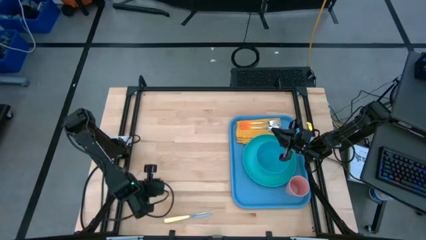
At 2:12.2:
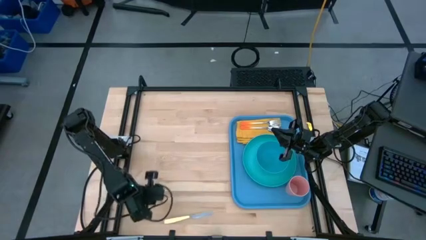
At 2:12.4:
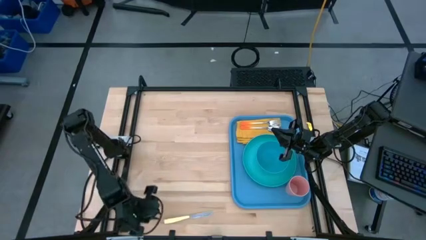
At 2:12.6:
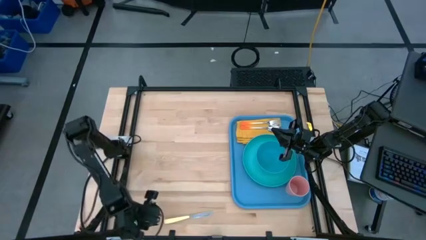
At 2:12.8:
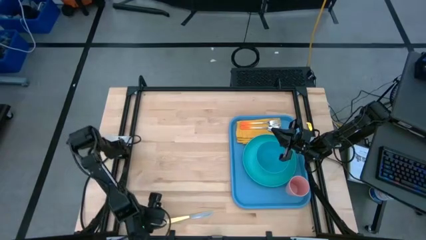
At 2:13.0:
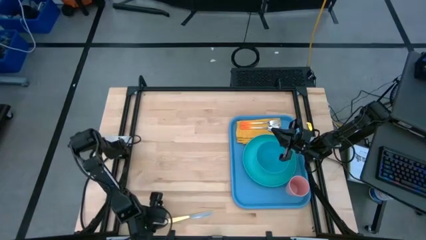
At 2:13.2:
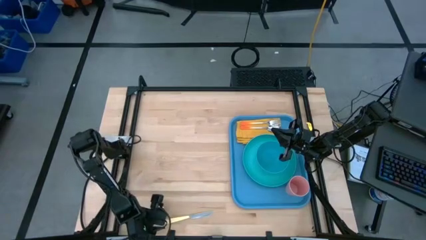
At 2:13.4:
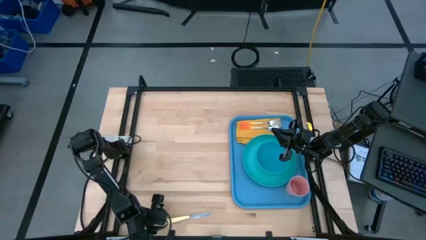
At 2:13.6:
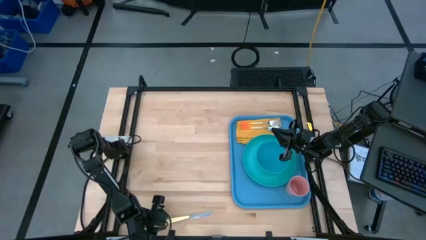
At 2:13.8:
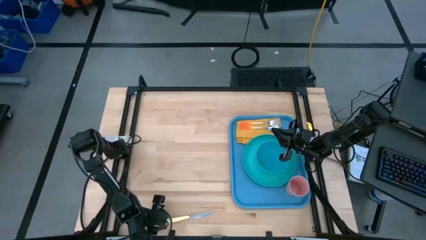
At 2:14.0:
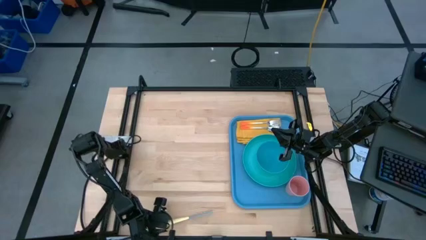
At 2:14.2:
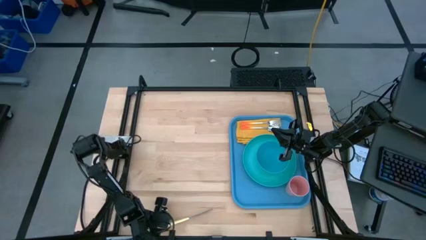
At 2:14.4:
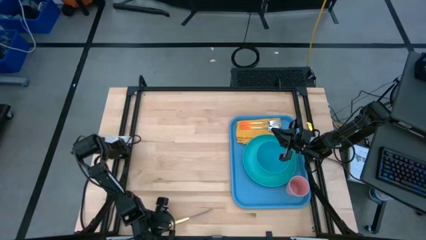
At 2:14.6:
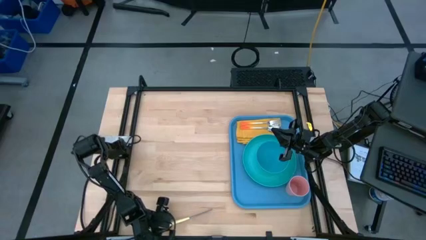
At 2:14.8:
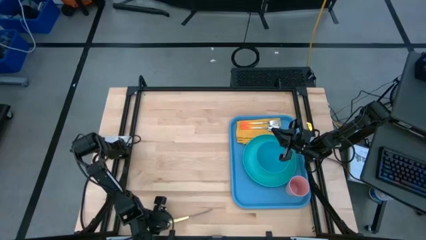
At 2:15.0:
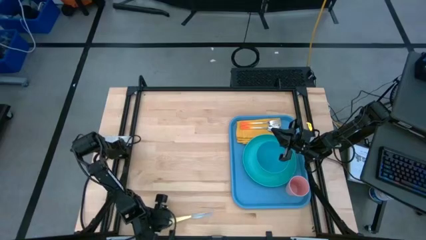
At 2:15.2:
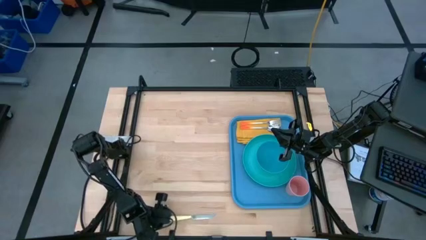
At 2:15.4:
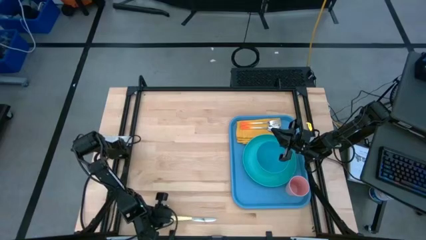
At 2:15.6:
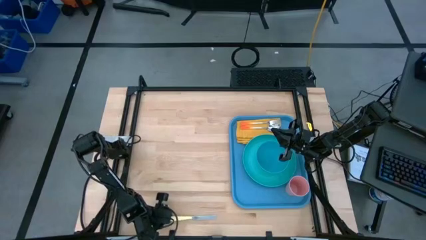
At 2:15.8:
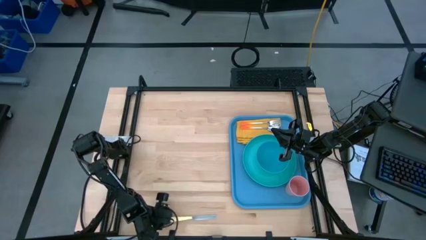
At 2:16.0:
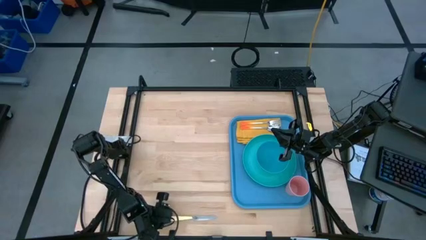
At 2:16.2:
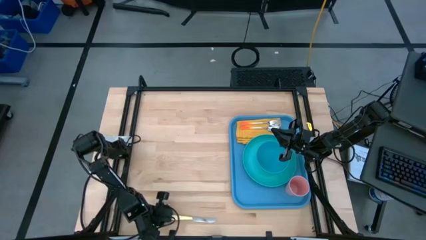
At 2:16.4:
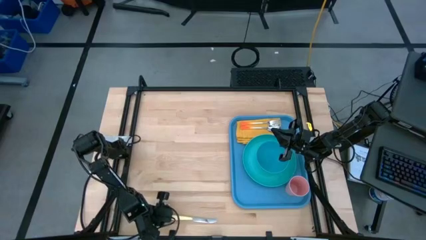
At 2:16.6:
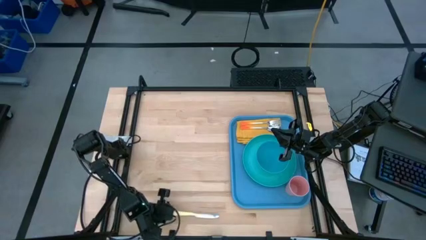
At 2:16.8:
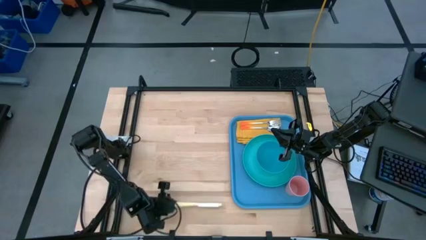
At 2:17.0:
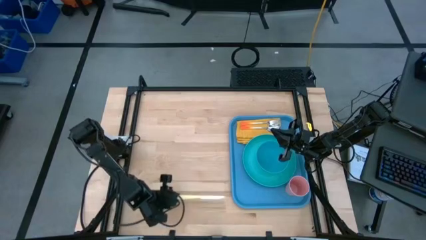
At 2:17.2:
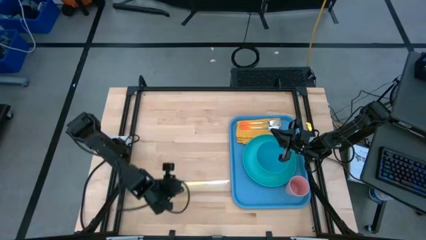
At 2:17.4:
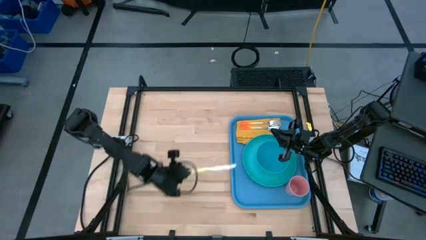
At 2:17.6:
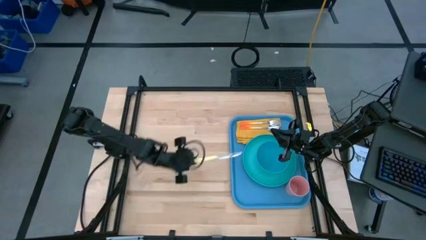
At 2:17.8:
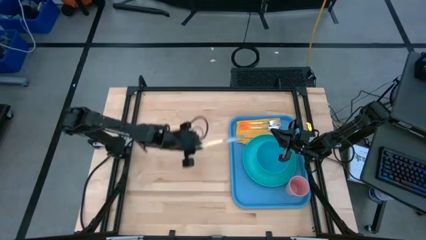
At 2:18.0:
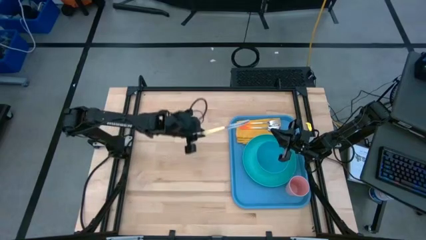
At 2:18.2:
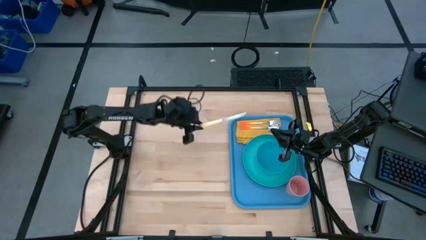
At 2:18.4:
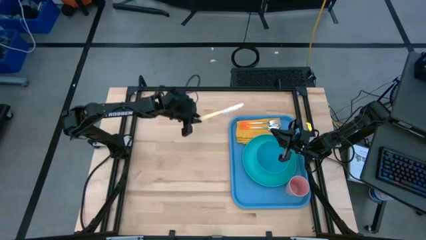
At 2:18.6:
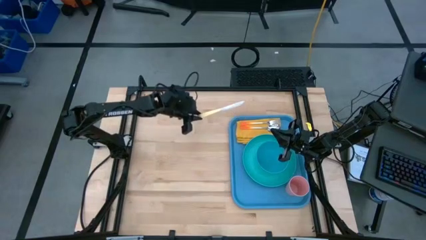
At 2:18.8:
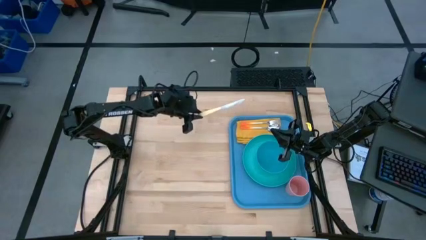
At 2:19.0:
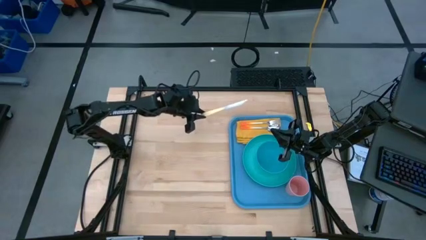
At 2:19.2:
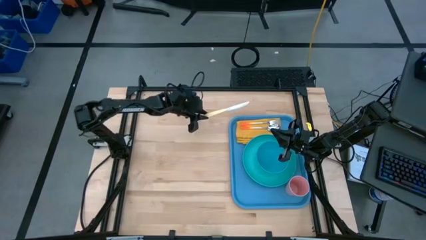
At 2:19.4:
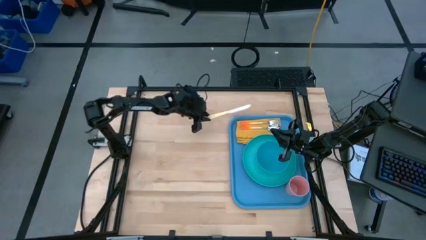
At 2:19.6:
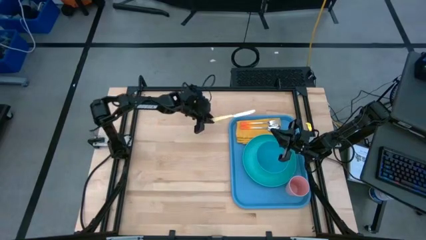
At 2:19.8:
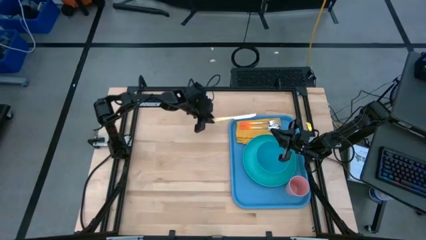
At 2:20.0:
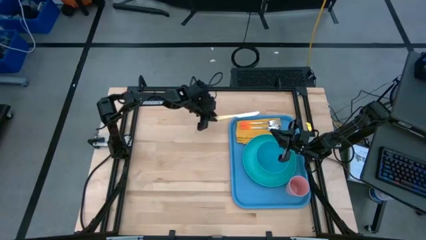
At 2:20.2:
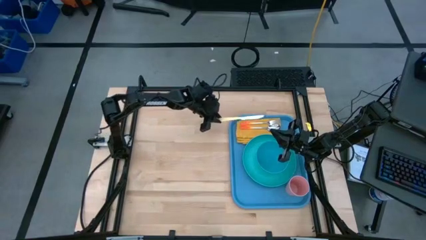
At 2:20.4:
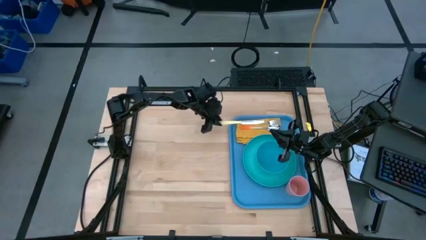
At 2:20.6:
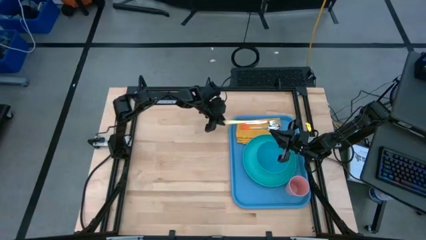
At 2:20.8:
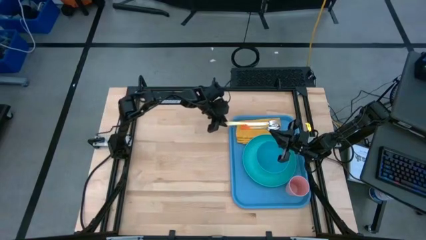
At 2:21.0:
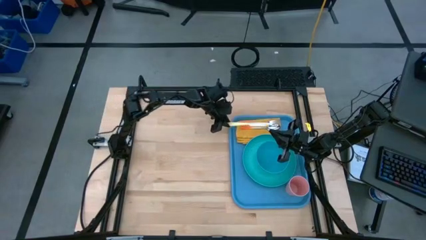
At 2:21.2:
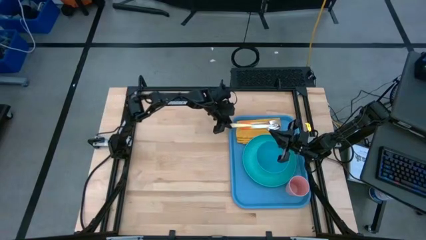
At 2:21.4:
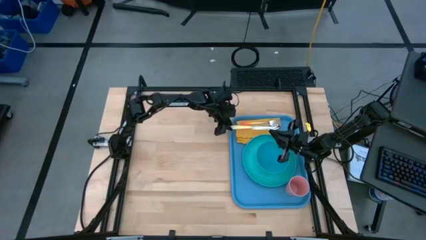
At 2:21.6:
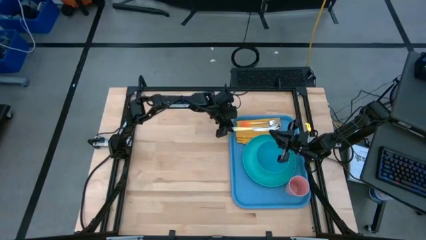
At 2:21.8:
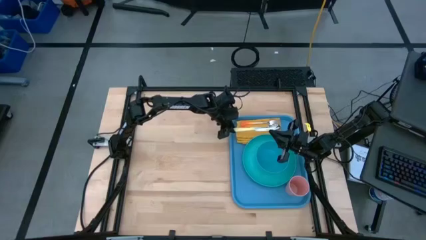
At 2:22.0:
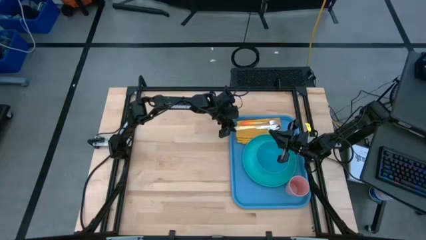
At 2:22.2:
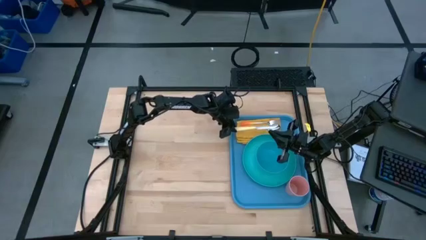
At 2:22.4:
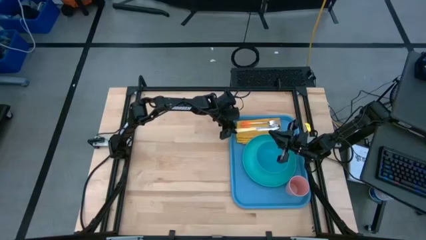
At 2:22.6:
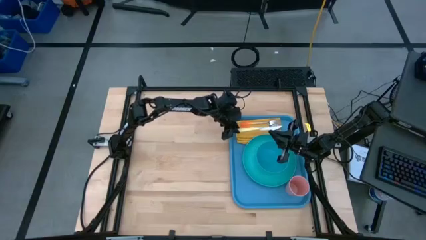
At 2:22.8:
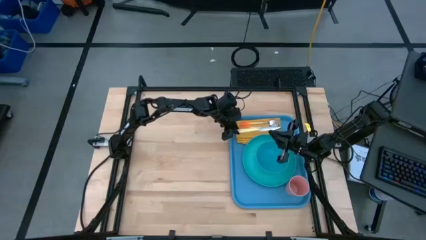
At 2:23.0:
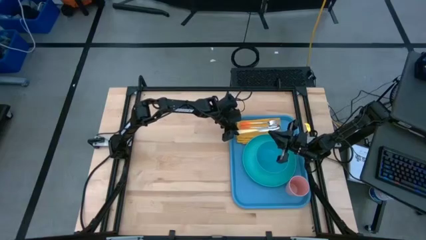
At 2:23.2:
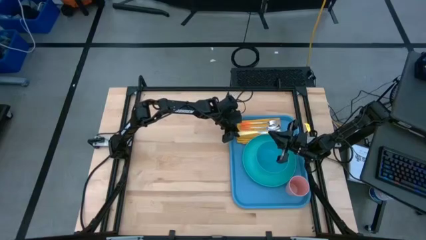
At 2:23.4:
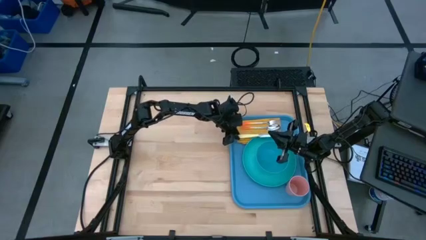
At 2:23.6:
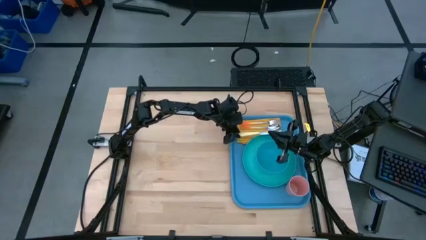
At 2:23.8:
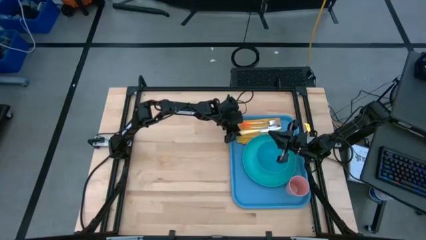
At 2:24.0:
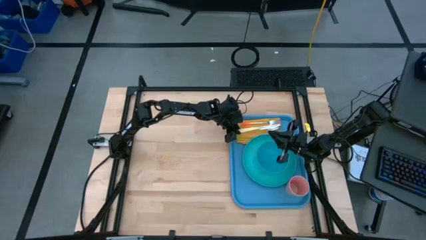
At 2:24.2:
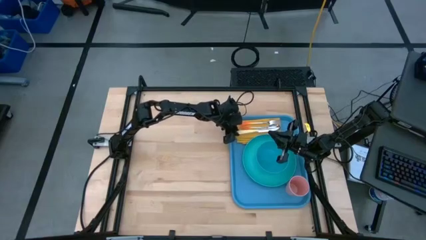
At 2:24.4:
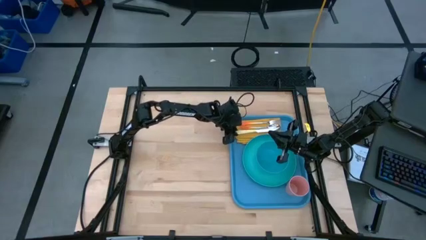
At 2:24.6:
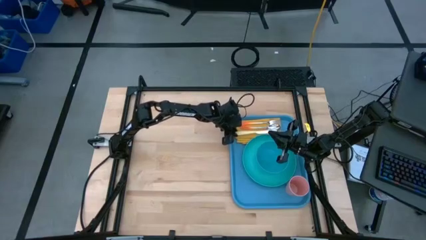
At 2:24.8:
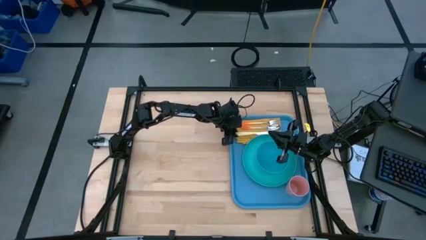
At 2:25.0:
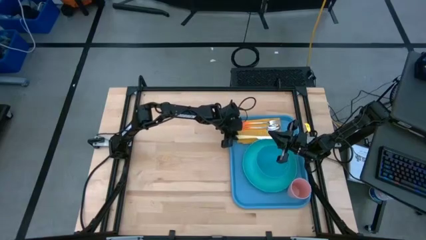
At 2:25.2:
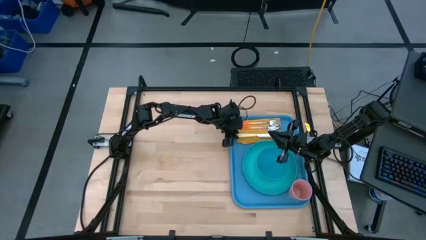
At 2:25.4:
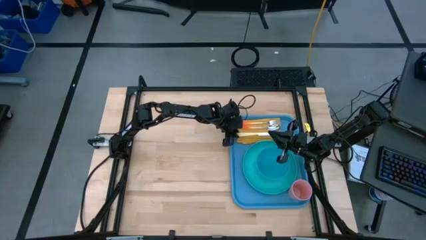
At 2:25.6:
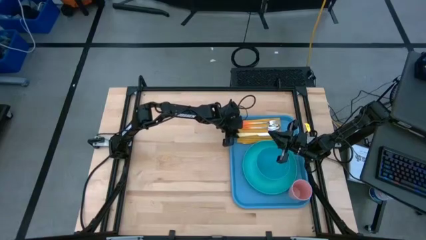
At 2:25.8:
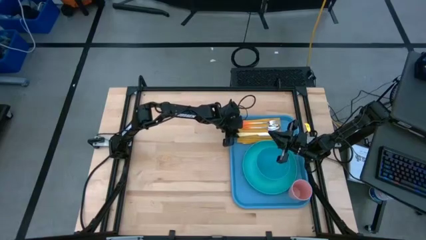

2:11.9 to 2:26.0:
Task: Set up tray
Put the light yellow knife on the napkin to the left of the blue plate
